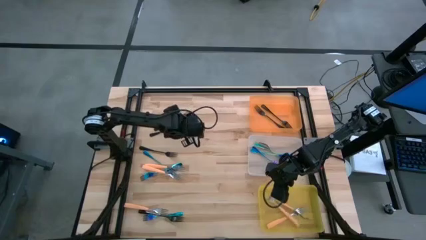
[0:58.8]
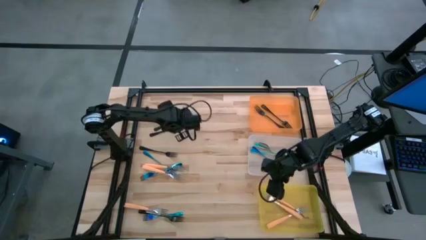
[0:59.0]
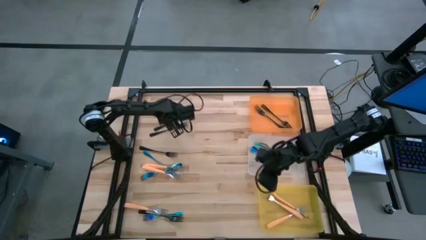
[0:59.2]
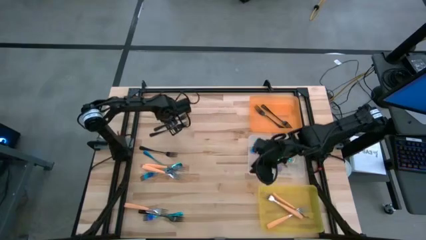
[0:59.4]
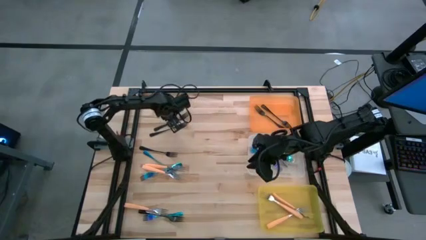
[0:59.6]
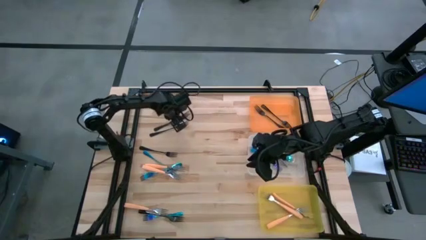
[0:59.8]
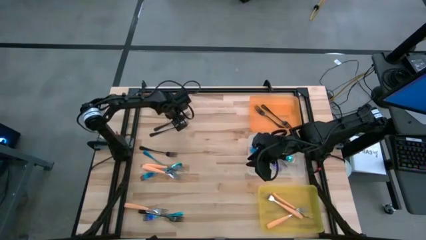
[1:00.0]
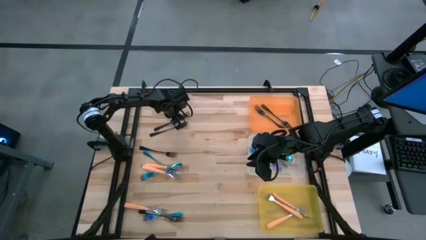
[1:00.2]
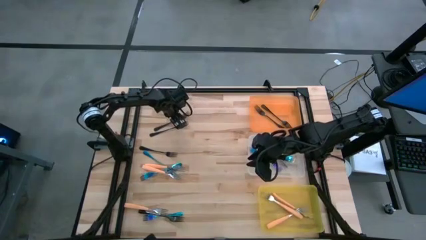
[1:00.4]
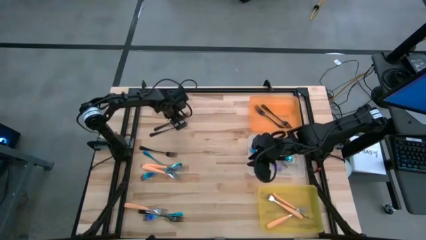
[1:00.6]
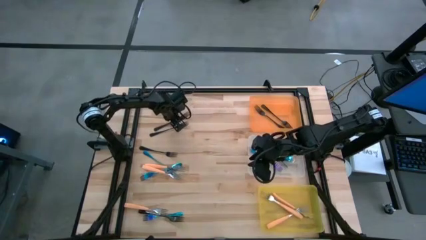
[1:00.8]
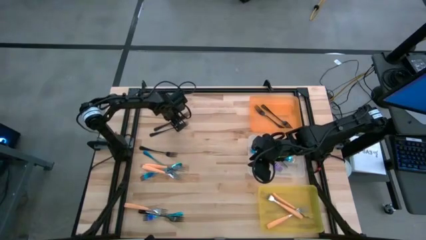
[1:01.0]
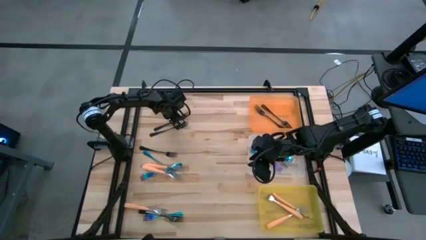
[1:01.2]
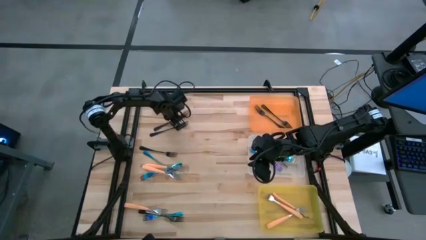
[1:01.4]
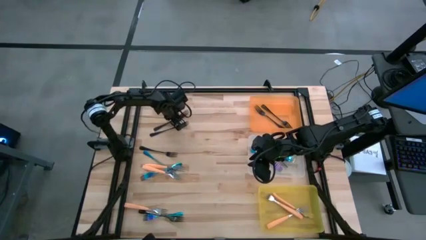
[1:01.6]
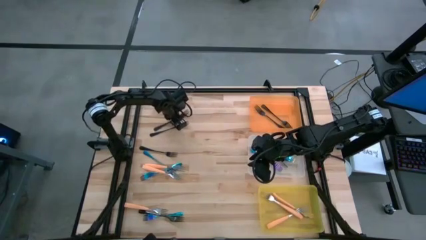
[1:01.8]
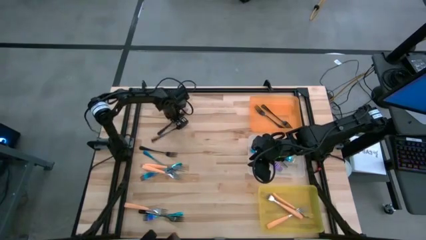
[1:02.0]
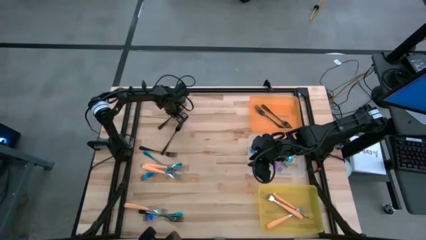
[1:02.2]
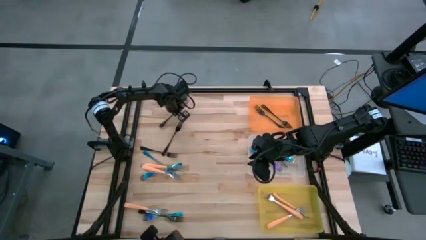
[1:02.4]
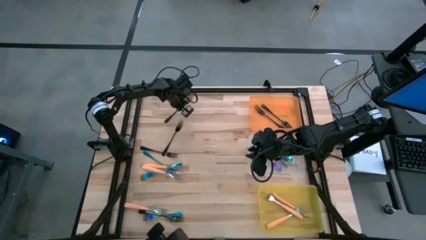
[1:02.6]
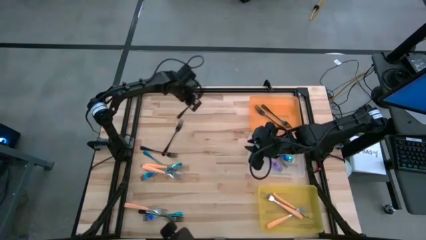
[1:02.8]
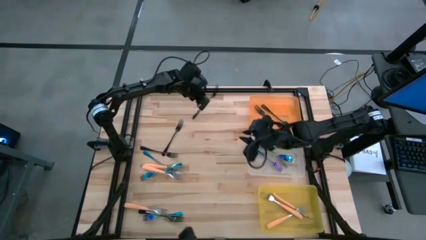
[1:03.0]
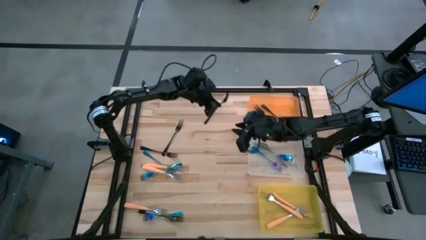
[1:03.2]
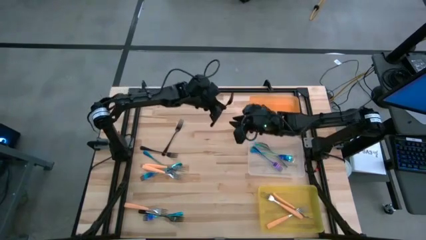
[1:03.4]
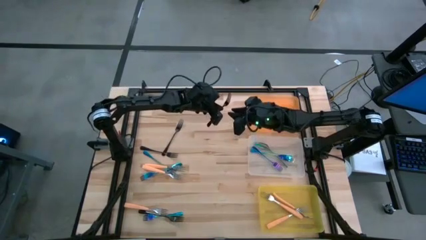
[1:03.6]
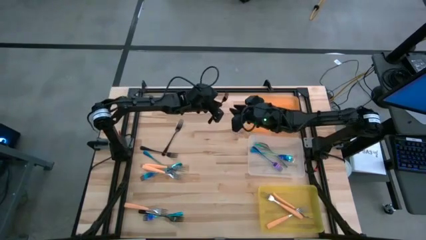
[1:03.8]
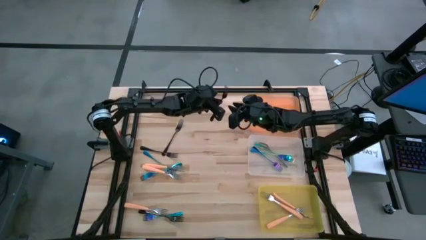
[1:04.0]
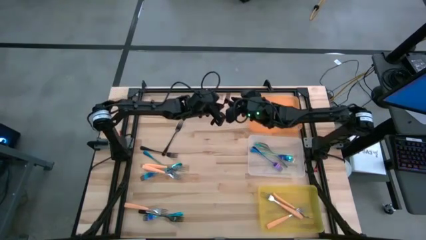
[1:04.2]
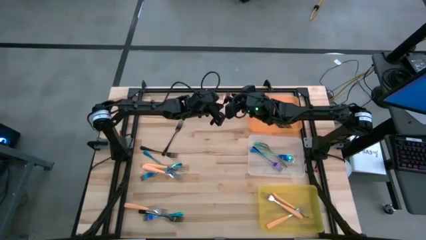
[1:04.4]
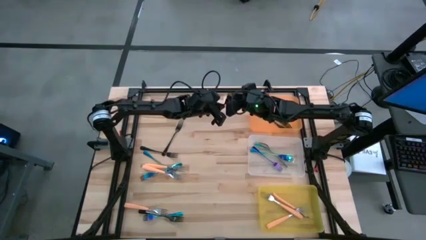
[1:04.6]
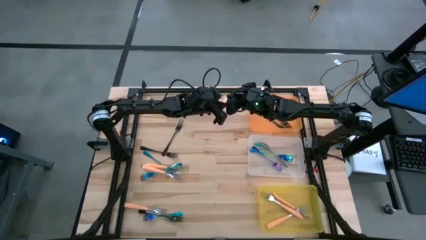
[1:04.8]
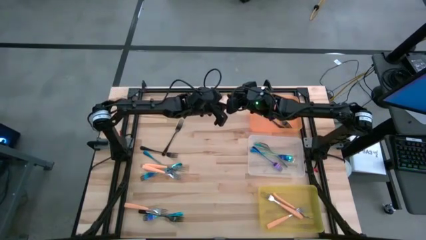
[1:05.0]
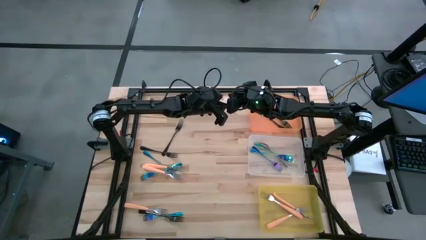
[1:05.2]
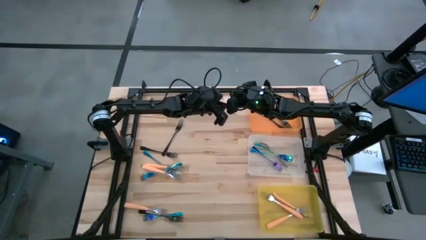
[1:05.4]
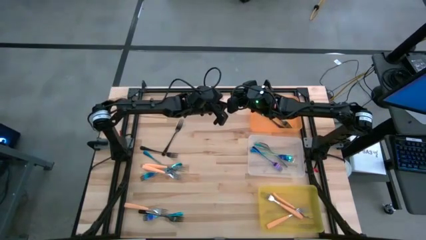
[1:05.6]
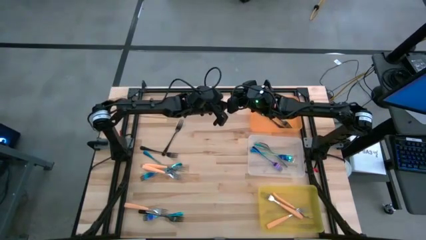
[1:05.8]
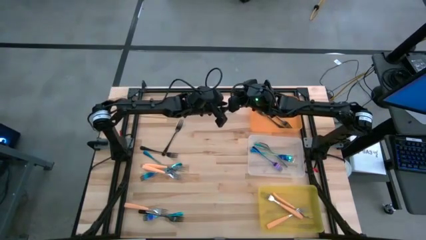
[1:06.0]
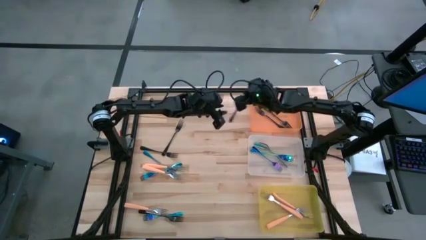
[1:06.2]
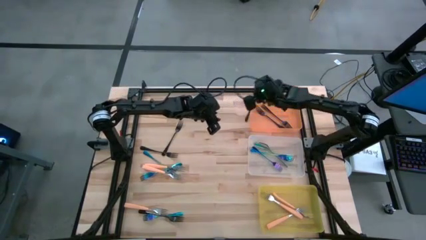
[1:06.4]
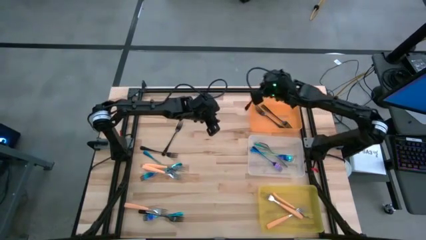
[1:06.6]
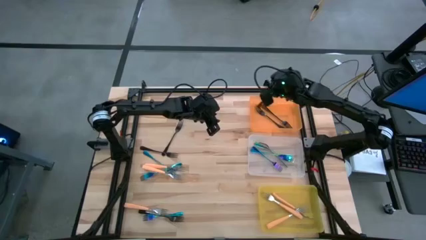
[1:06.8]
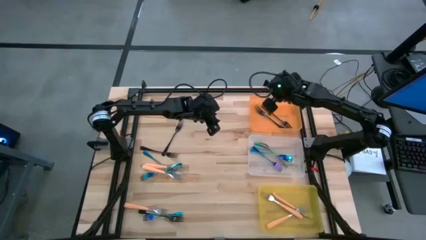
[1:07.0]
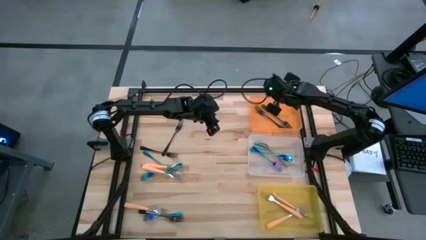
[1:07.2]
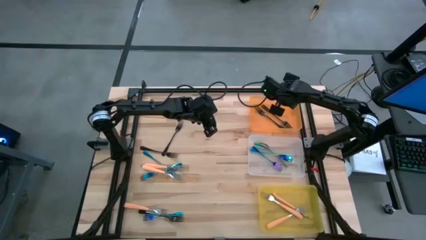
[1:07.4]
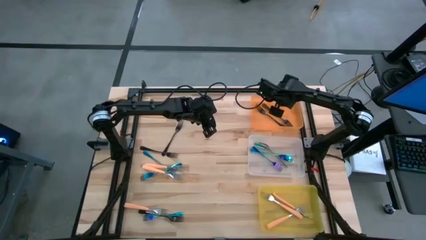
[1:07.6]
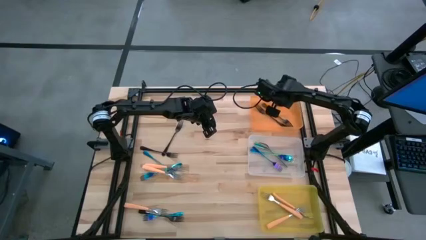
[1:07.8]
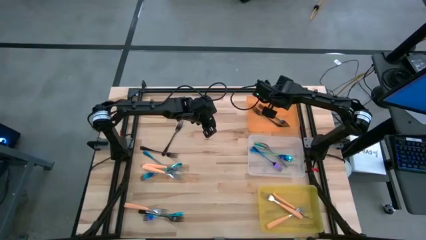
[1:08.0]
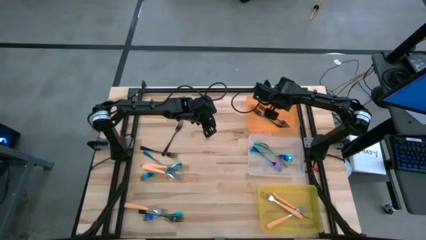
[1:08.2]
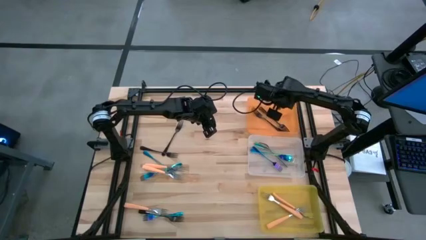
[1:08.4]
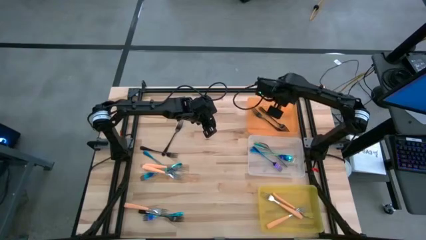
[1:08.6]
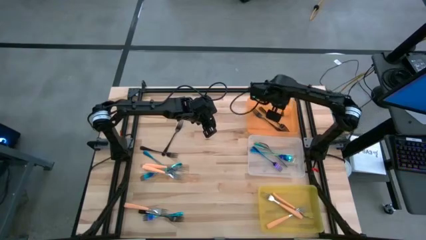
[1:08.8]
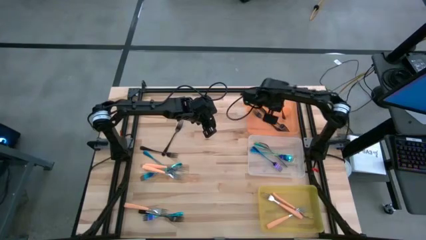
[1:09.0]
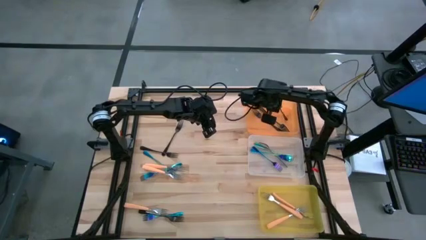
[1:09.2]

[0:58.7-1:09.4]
Task: Sort silverware by color (type)
Put the black fork into the orange bin

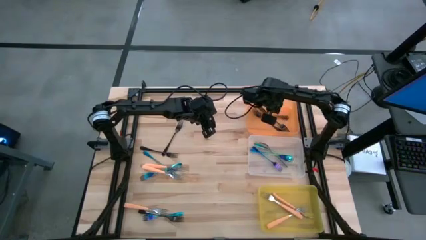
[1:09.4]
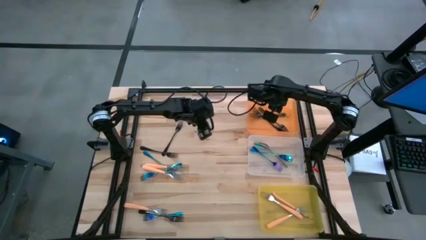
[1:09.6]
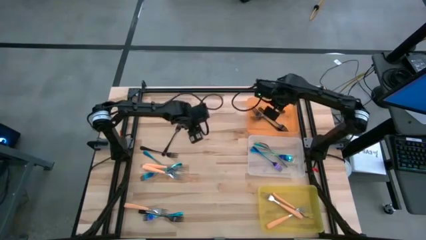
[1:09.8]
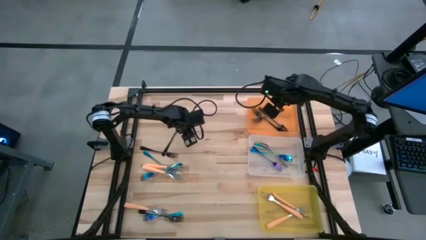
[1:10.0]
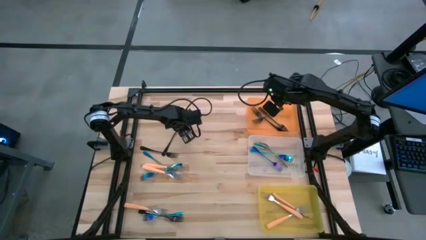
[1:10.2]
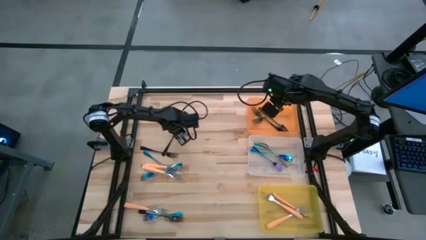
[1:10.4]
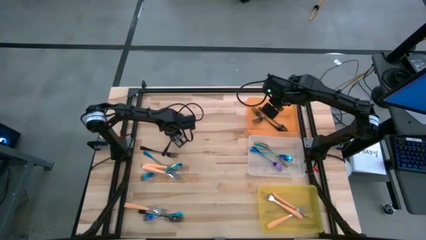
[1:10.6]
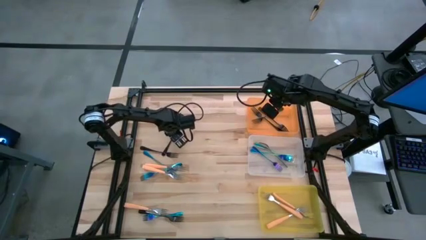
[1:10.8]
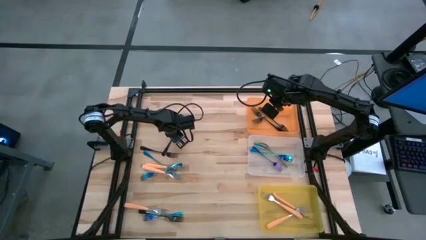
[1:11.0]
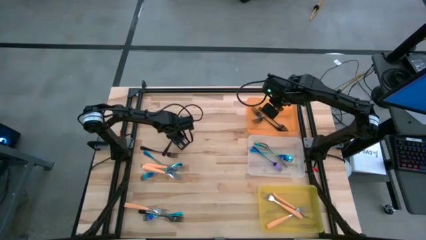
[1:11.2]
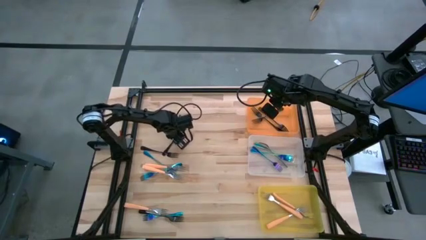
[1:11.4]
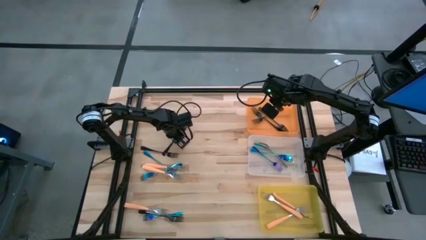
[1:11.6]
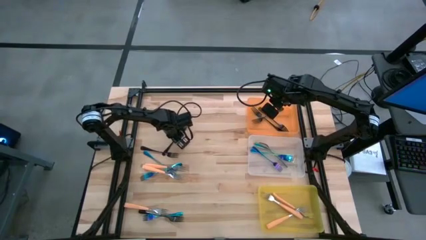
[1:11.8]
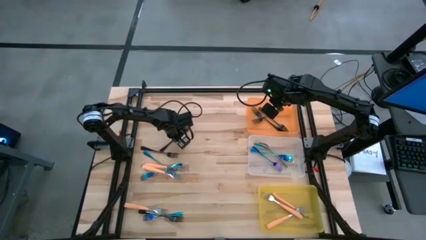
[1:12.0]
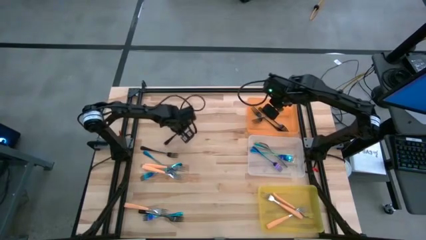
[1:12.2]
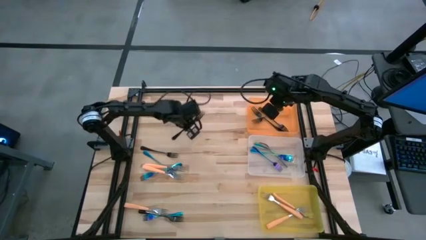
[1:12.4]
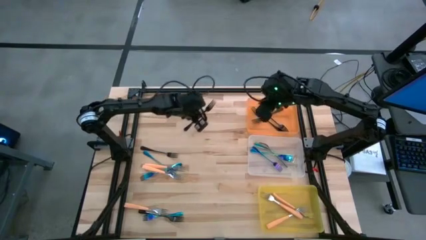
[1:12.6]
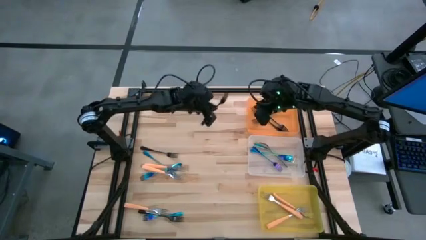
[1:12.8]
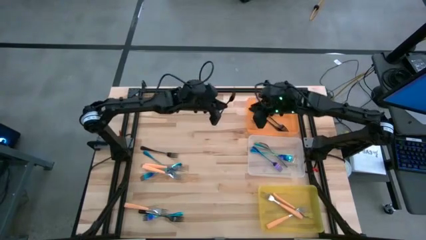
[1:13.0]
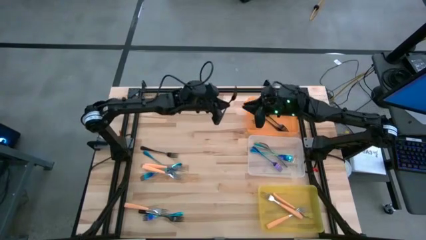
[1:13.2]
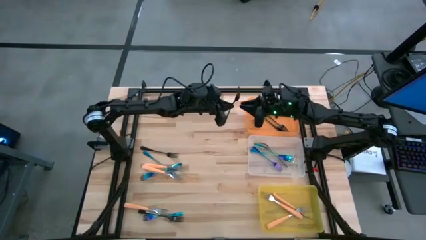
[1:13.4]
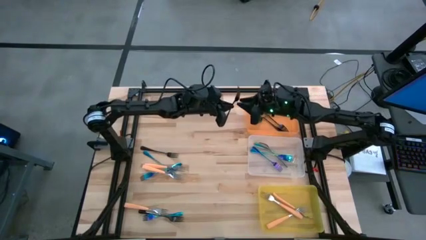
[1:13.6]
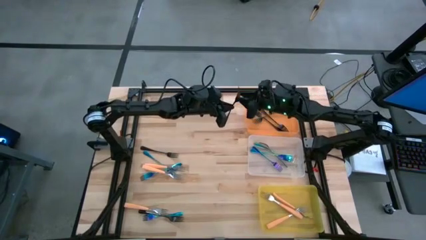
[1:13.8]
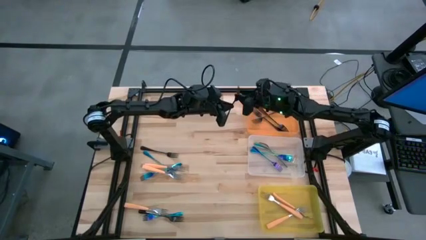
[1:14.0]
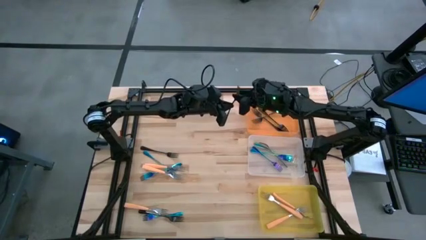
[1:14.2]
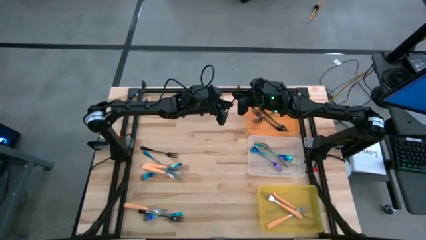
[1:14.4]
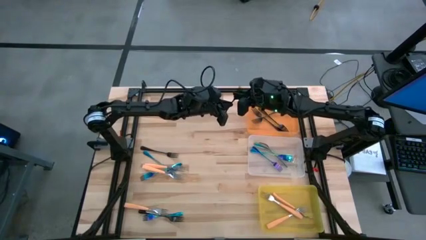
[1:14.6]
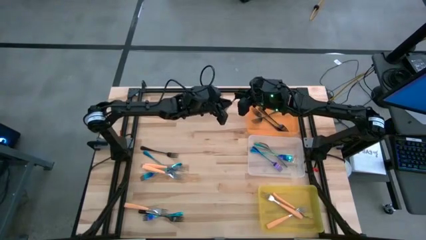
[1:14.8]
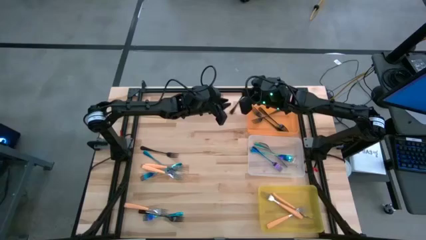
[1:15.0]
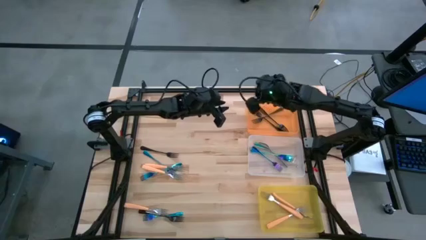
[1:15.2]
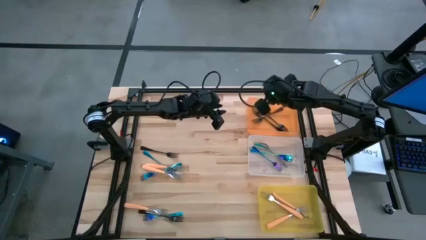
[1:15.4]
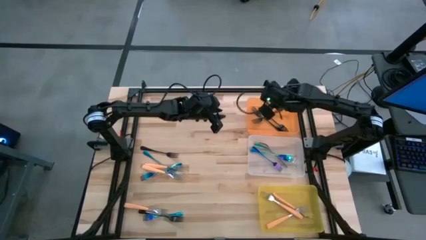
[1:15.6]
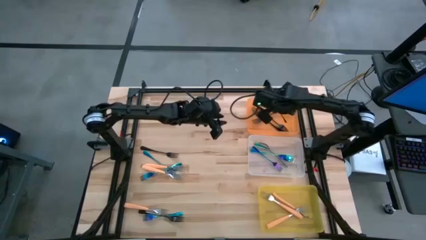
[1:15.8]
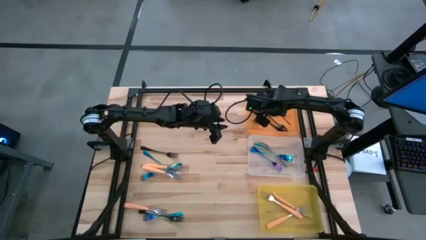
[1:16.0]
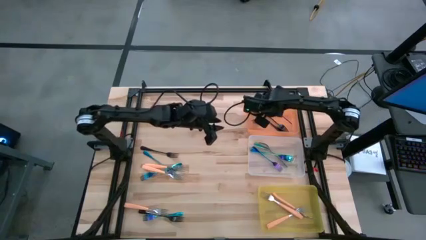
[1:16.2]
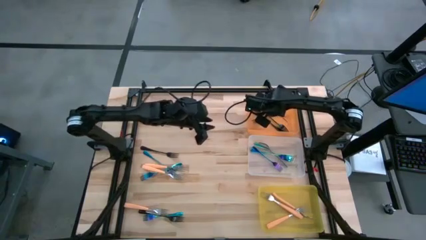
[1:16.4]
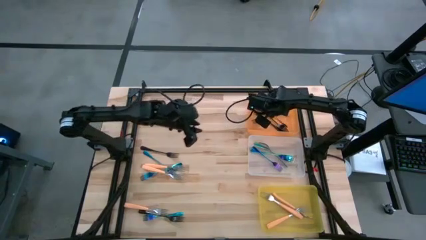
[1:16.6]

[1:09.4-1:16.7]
Put the black fork into the orange bin
